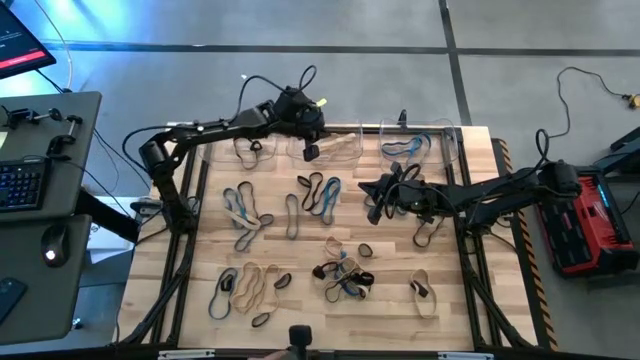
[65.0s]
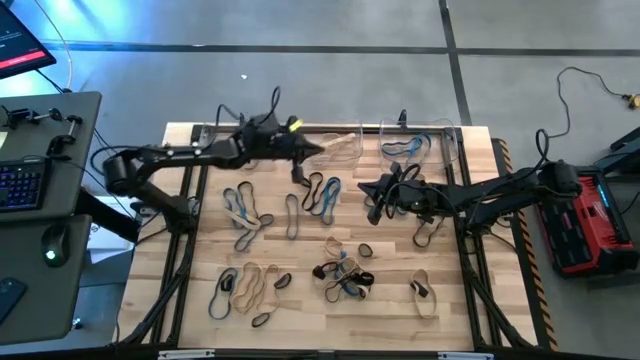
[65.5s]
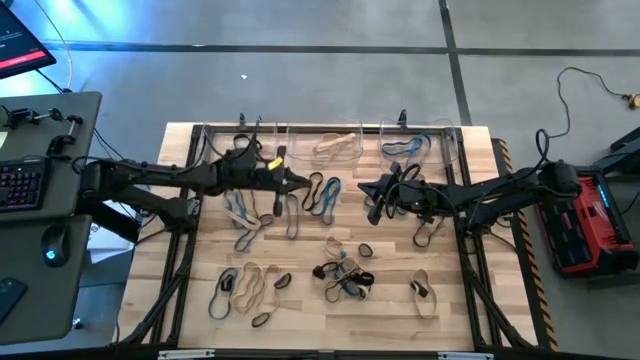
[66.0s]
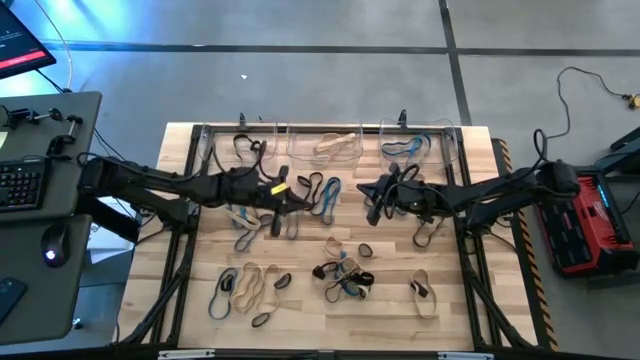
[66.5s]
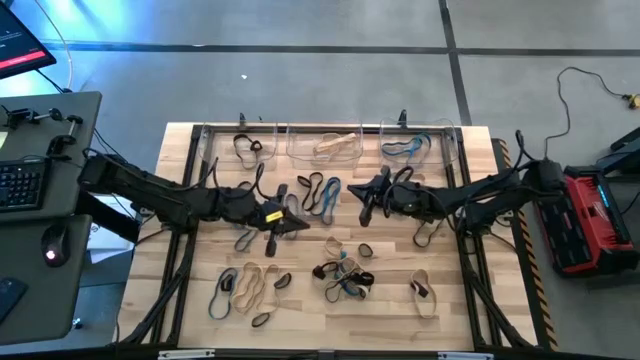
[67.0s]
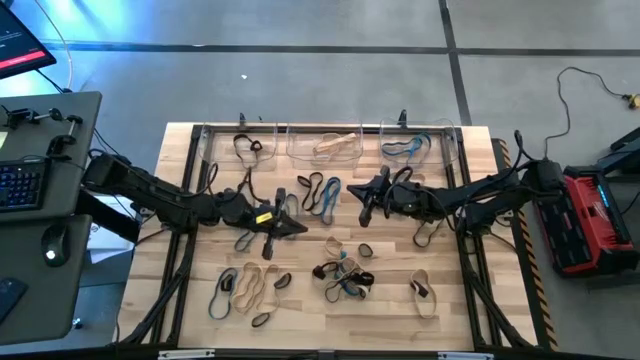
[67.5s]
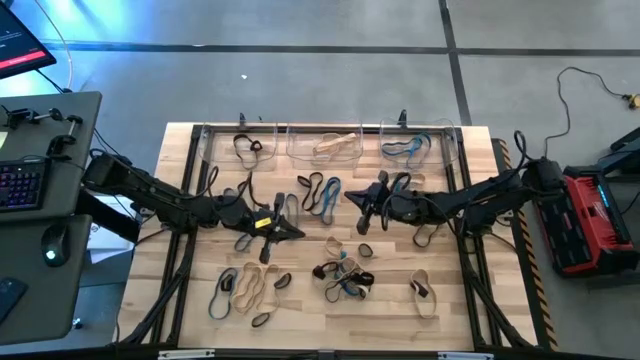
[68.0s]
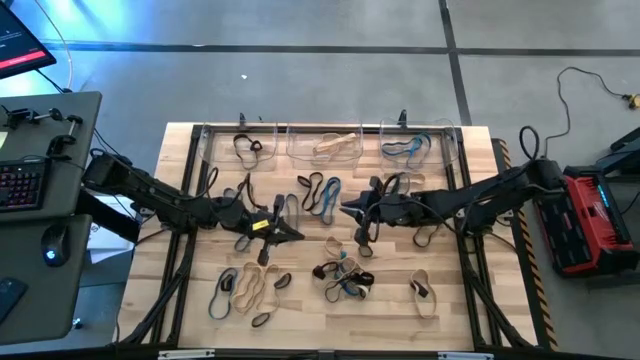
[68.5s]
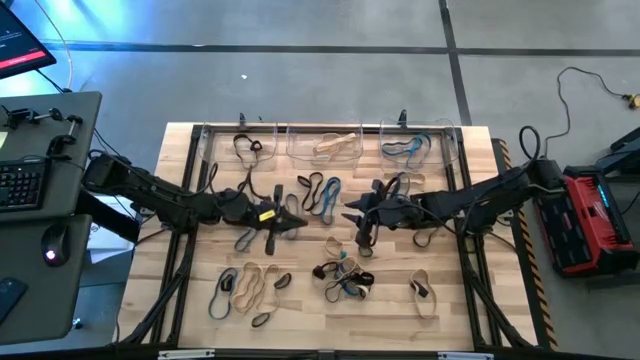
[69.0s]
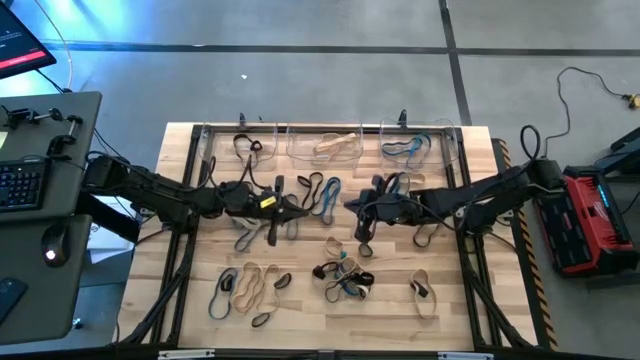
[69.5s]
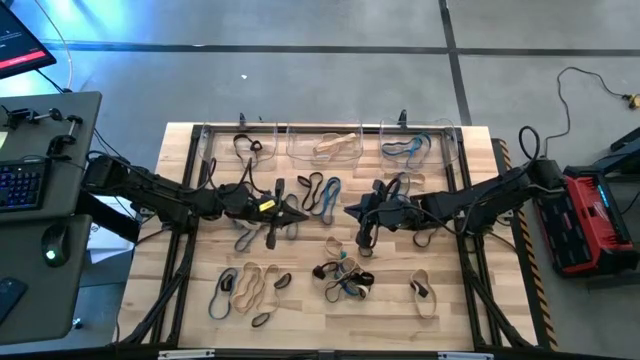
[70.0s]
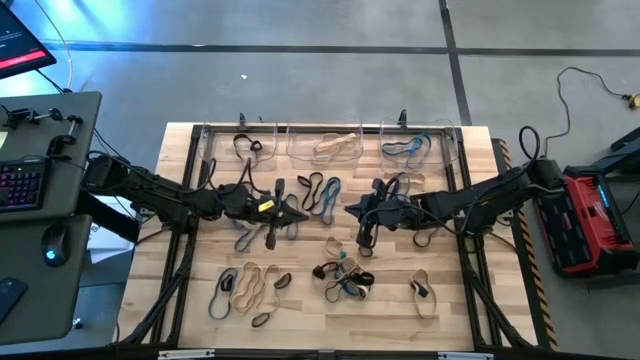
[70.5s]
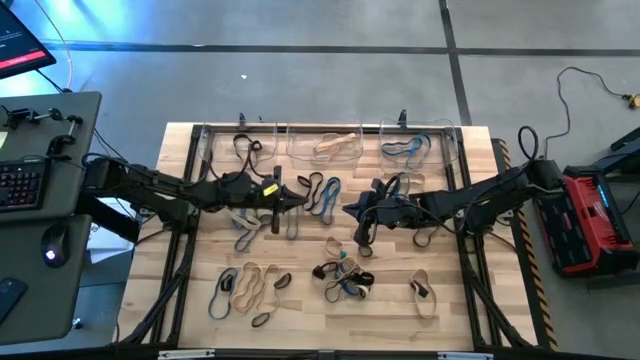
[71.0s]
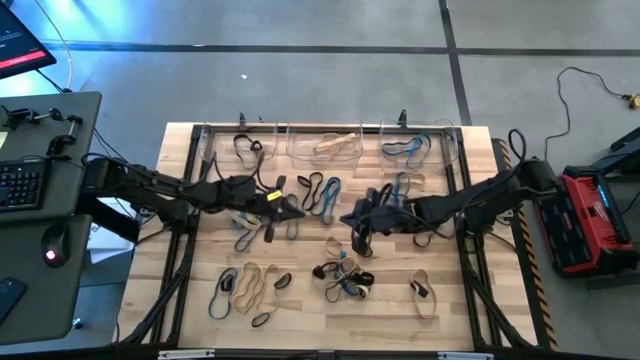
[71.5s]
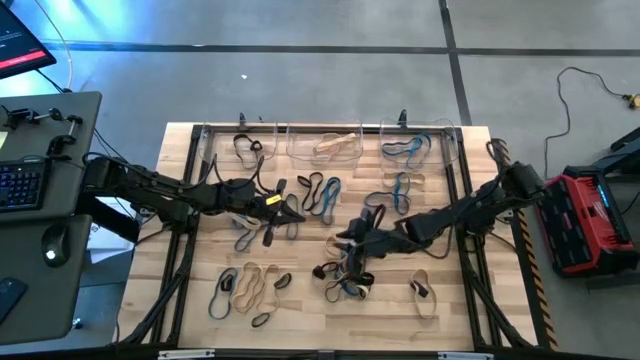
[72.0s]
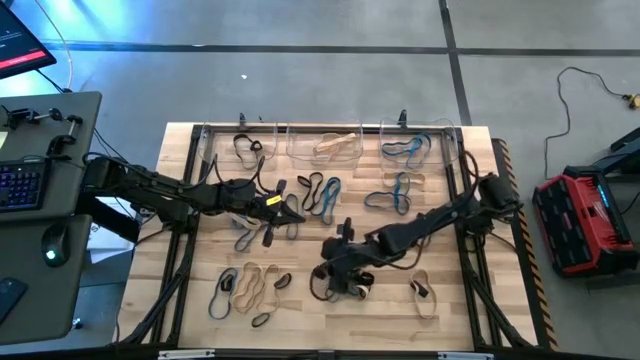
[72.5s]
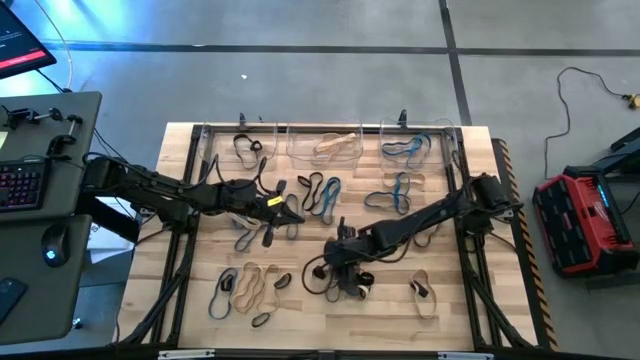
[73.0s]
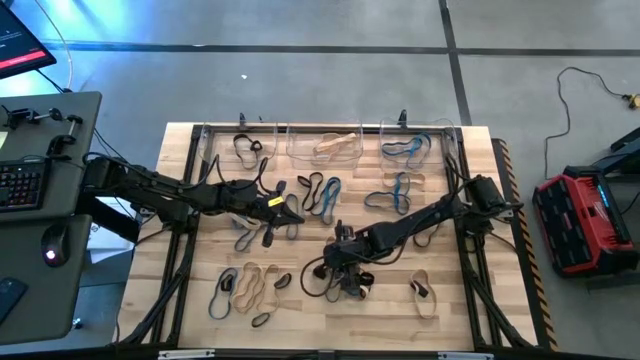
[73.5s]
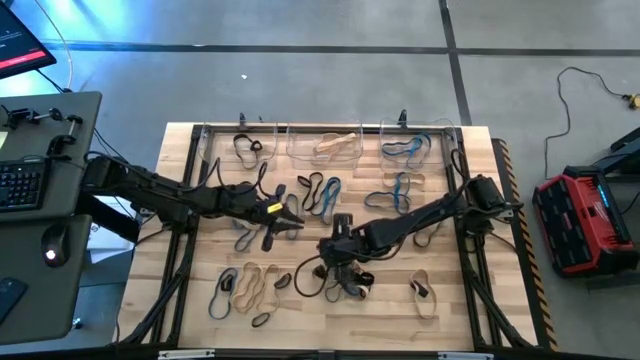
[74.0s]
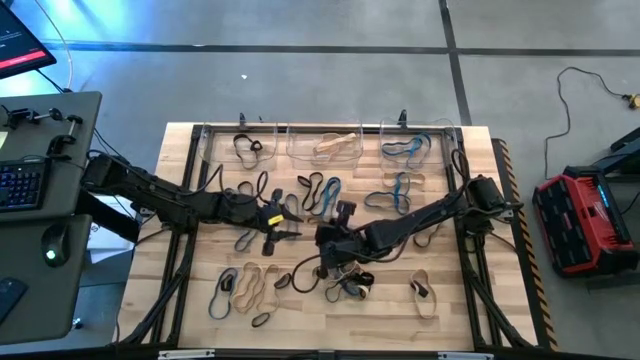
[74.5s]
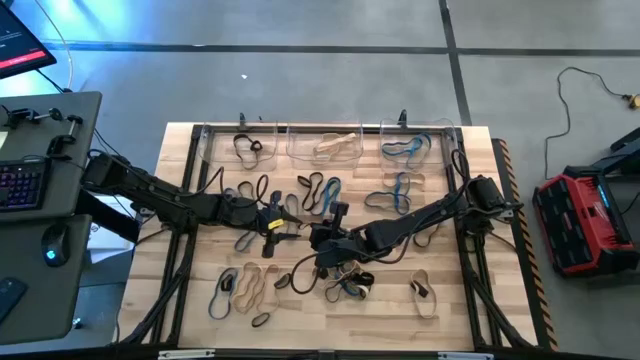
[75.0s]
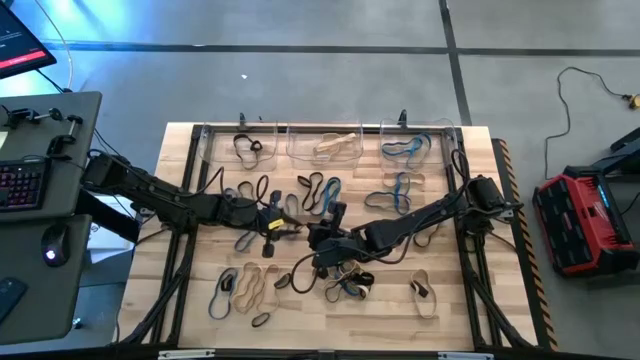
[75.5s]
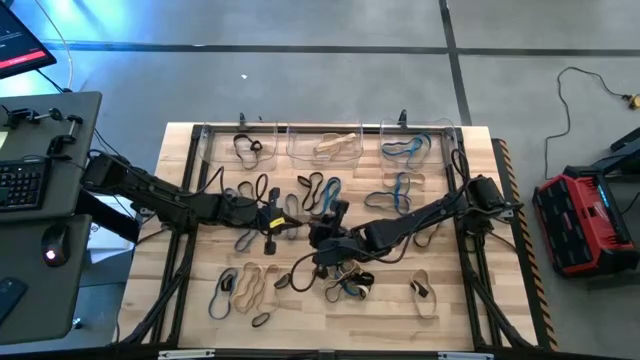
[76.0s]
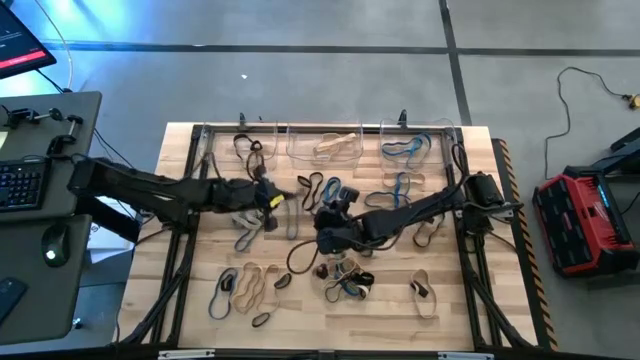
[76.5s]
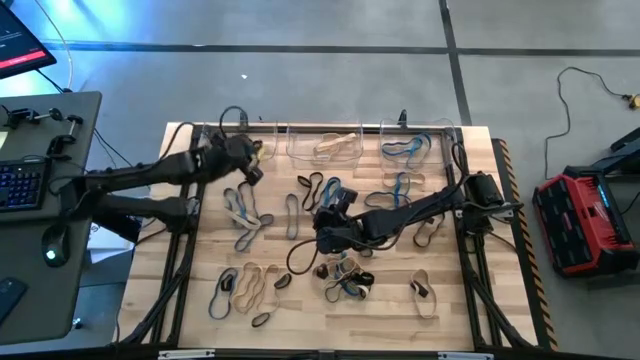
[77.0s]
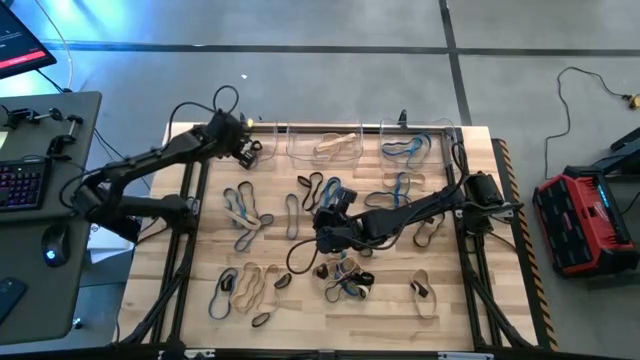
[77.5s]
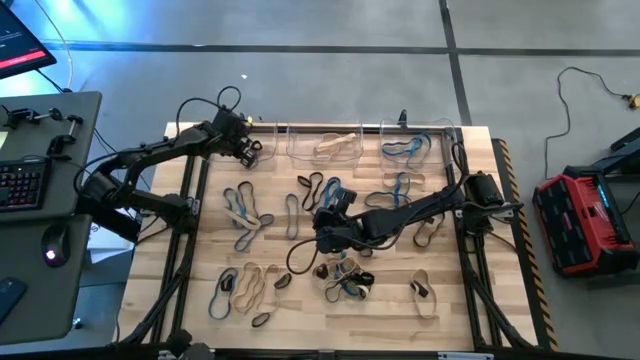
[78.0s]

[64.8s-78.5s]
Task: Sort rubber bands into baskets
Put the black rubber band into the left transparent bin

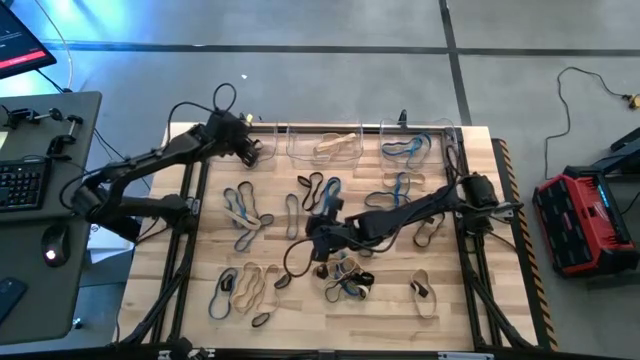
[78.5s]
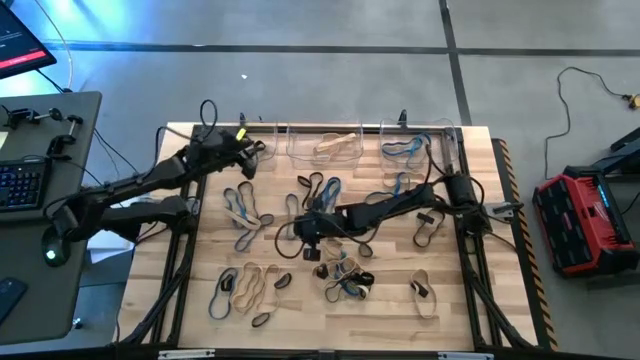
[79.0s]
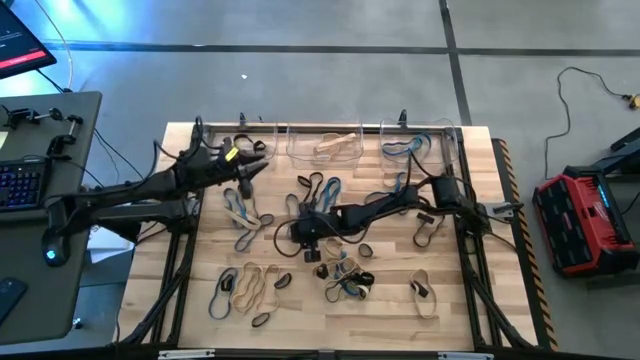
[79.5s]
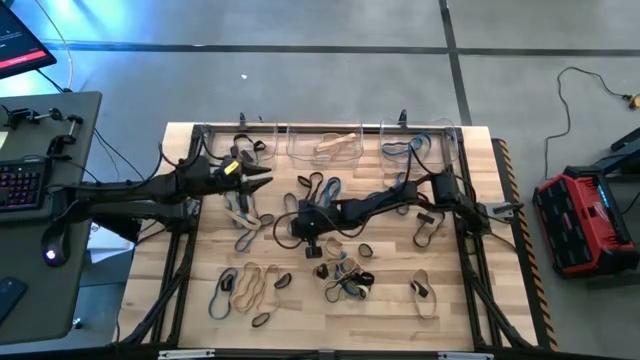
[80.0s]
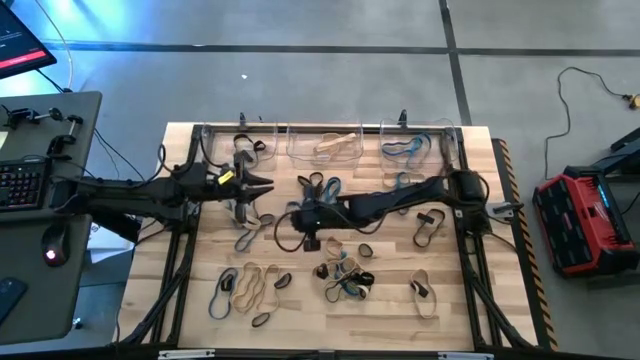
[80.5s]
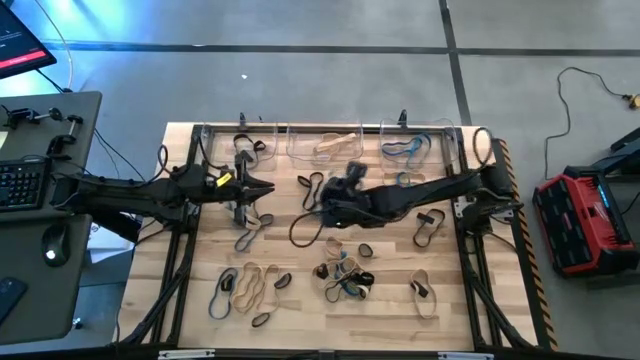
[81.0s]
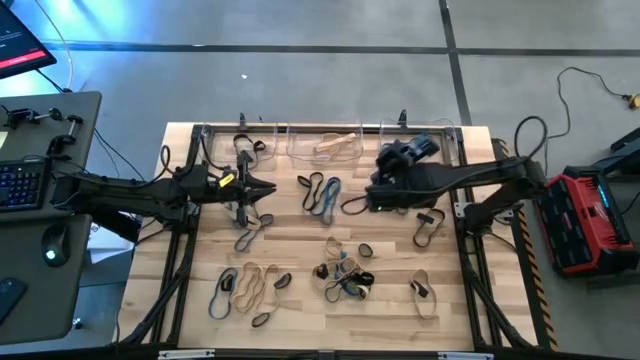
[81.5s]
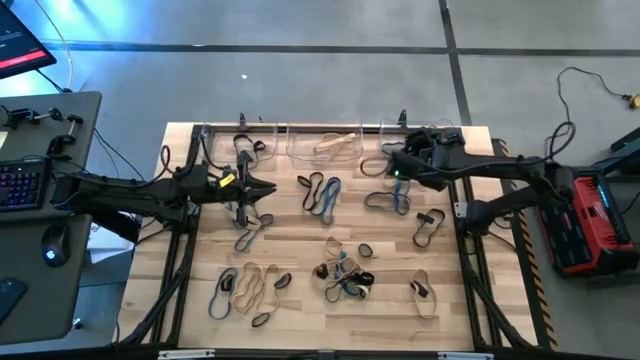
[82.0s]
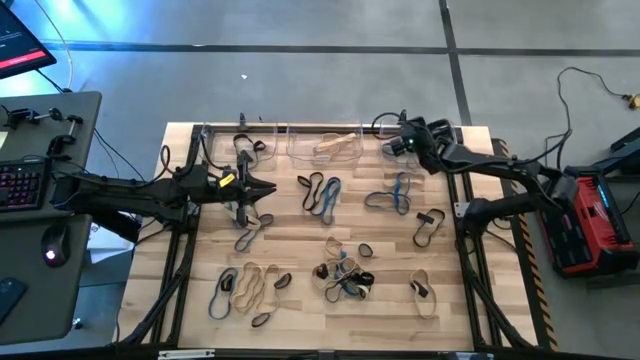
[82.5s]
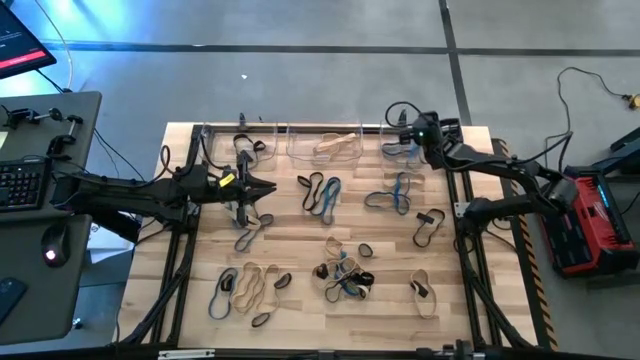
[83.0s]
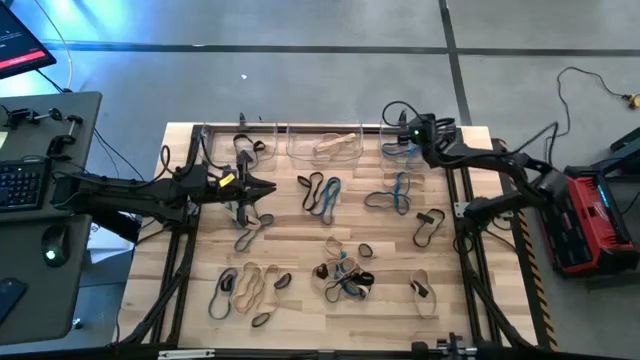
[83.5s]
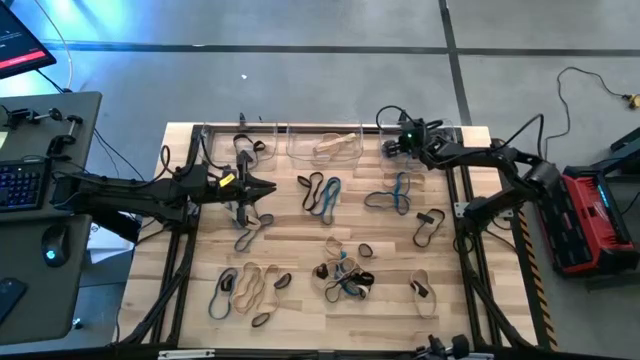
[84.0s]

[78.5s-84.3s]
Put the blue rubber band into the right transparent bin

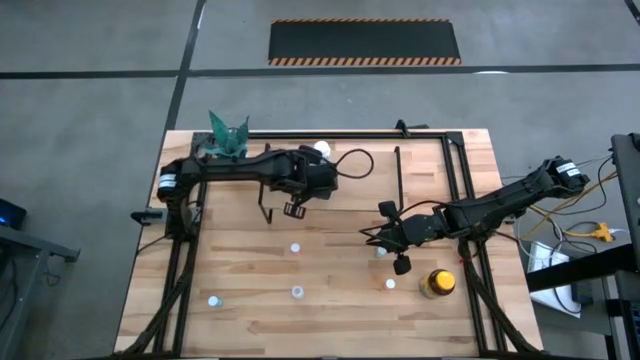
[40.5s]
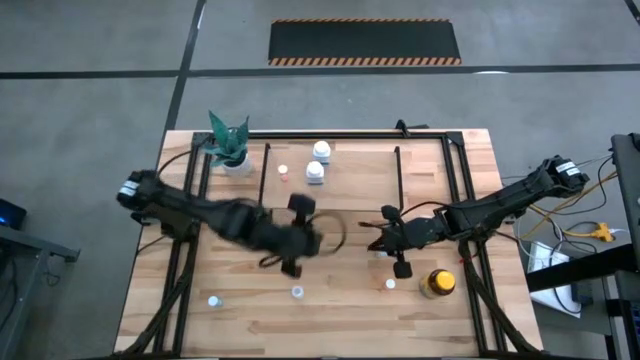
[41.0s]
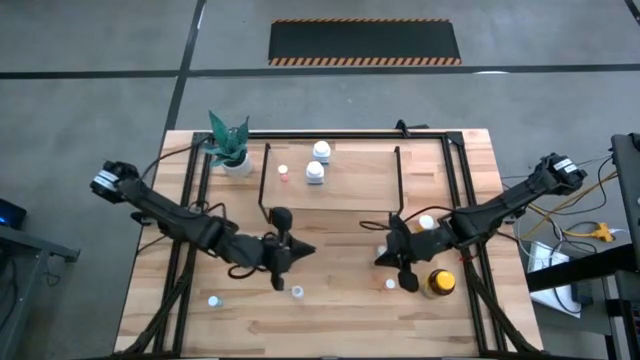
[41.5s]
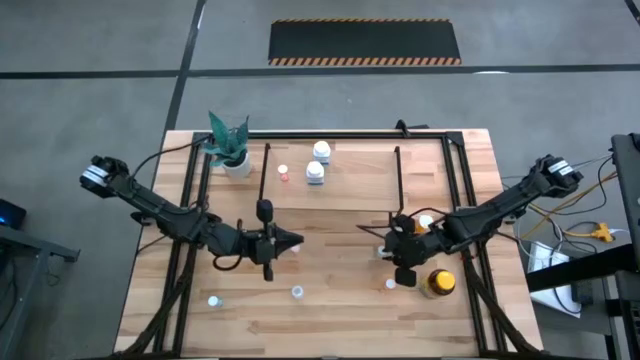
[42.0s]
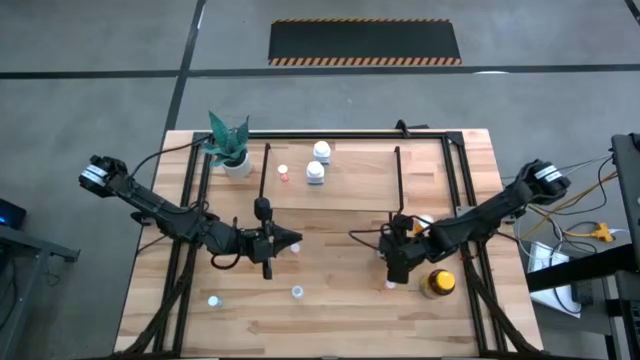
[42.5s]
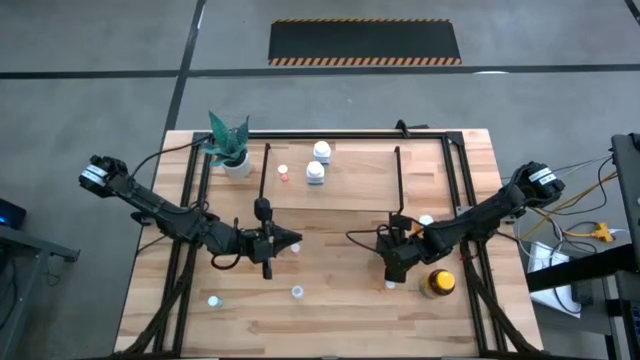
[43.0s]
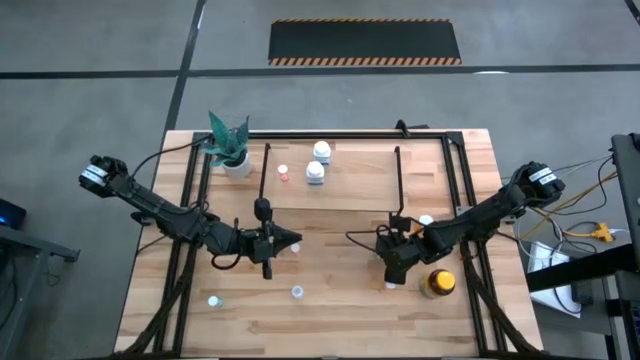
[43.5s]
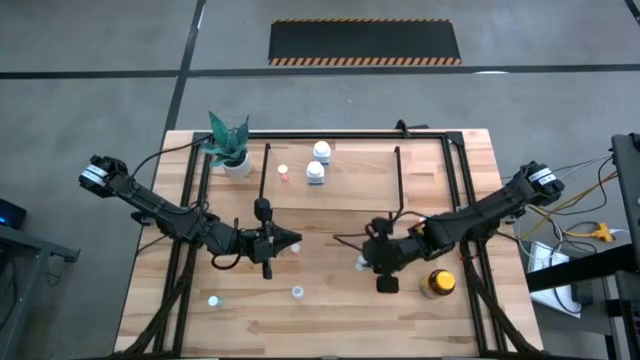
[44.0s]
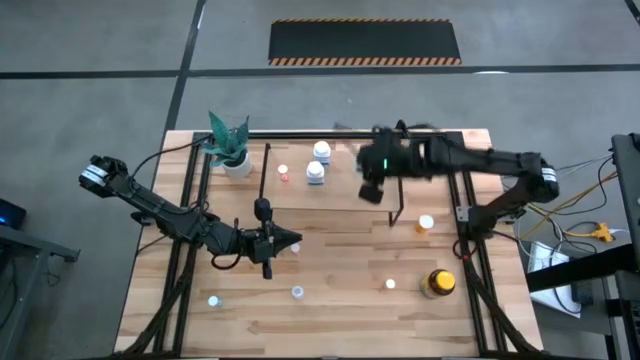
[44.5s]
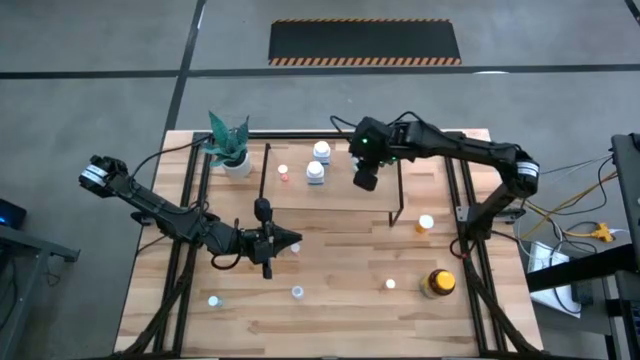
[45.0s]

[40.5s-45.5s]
Task: Pick and place medicine bottles onto shelf by color
Put the top blue pill bottle on the shelf
